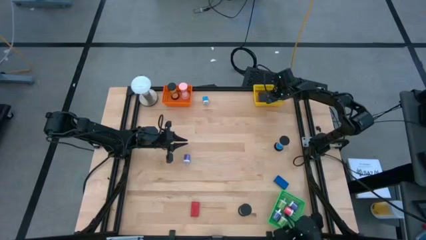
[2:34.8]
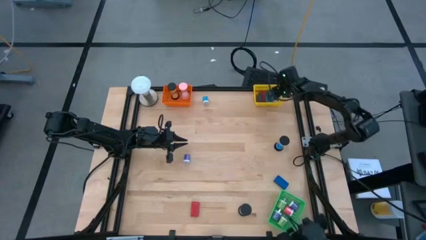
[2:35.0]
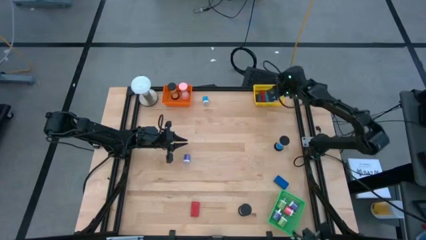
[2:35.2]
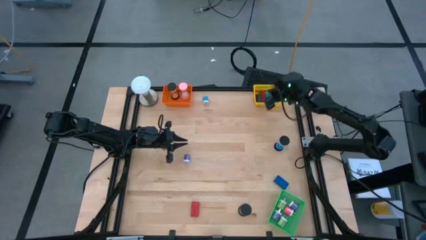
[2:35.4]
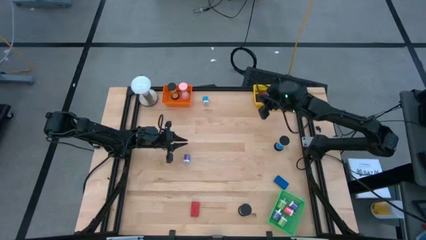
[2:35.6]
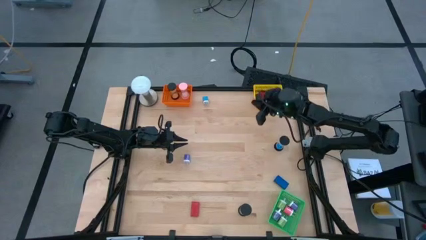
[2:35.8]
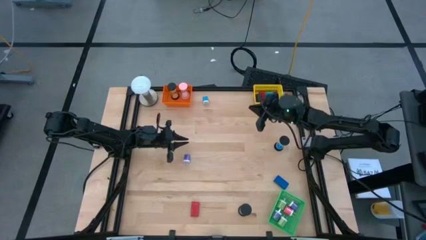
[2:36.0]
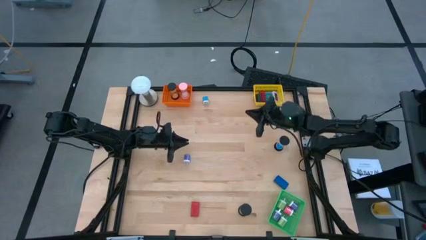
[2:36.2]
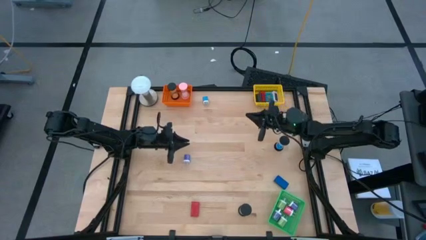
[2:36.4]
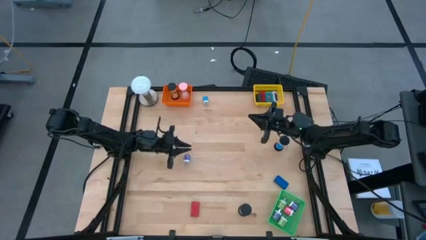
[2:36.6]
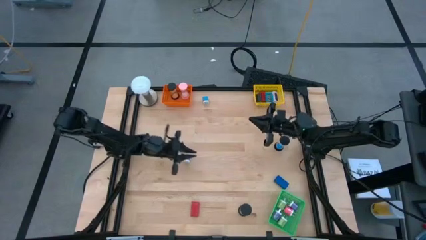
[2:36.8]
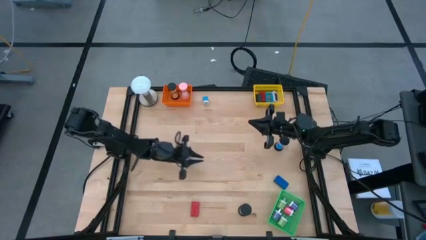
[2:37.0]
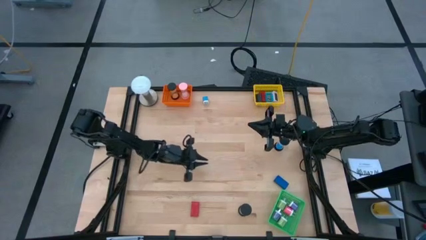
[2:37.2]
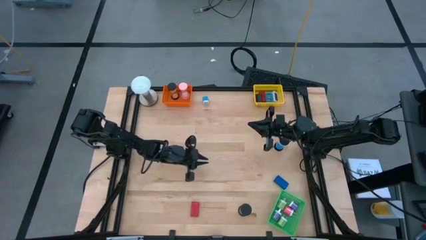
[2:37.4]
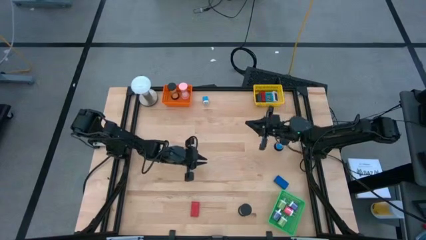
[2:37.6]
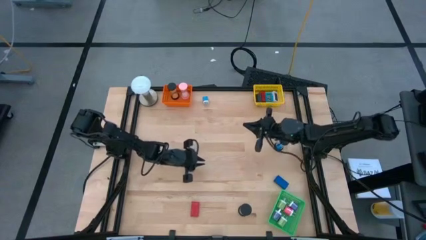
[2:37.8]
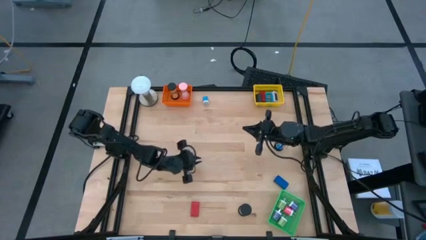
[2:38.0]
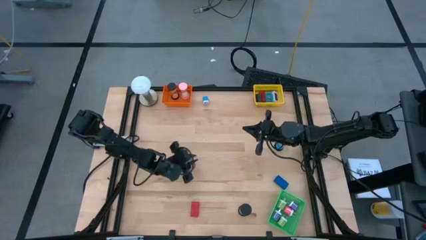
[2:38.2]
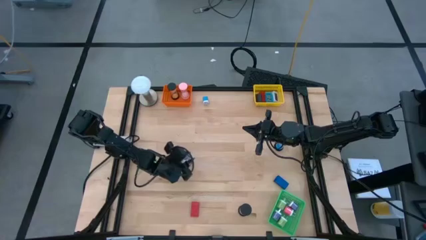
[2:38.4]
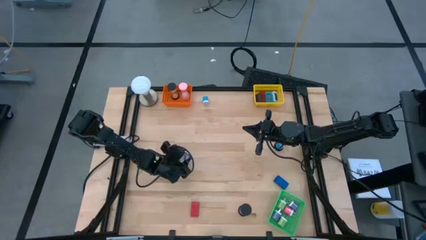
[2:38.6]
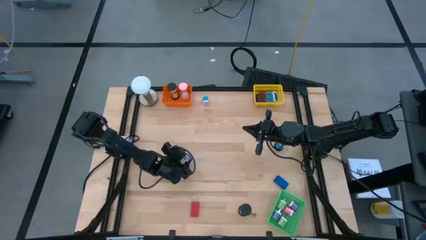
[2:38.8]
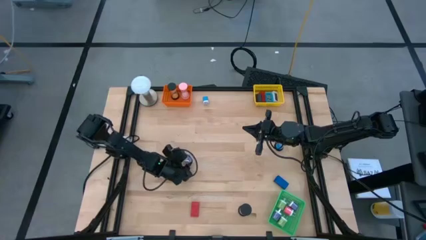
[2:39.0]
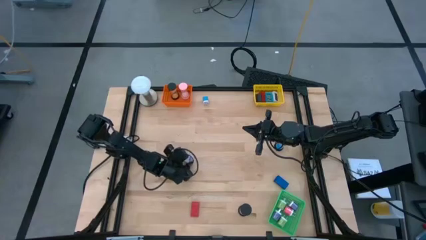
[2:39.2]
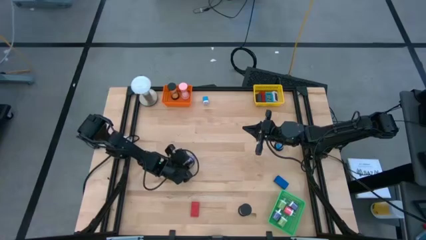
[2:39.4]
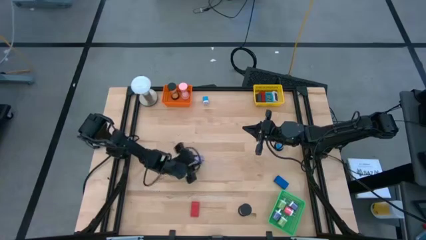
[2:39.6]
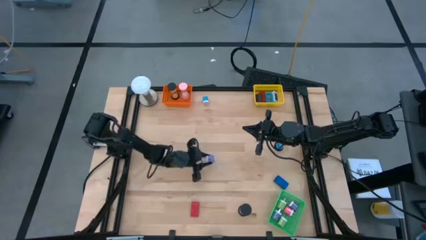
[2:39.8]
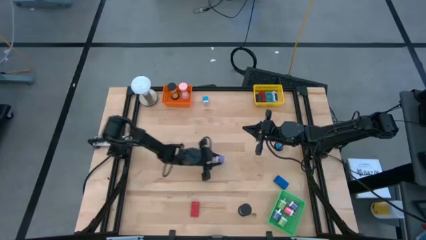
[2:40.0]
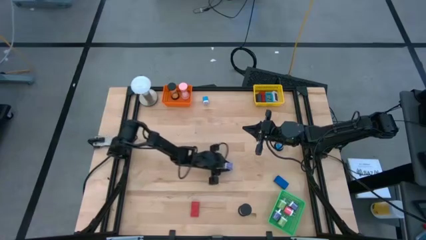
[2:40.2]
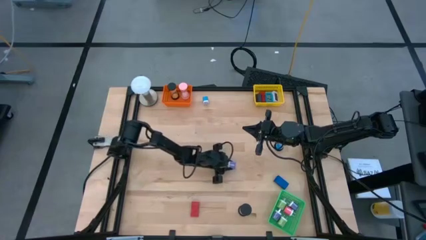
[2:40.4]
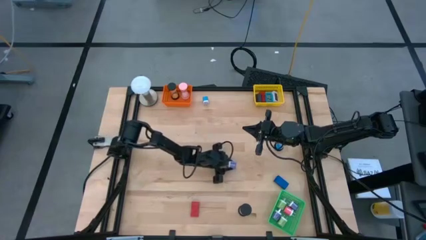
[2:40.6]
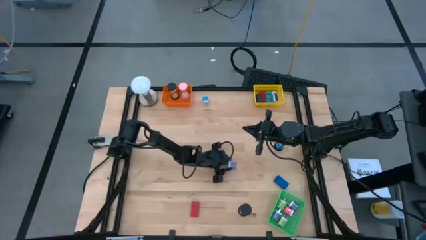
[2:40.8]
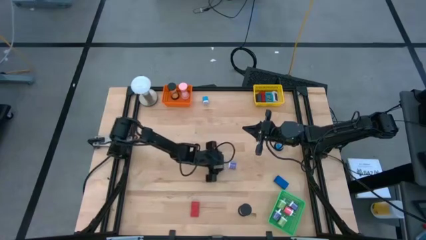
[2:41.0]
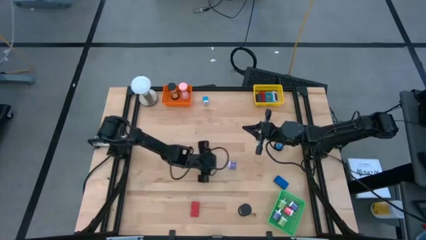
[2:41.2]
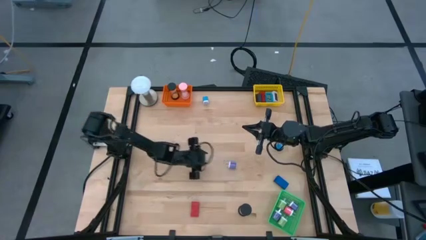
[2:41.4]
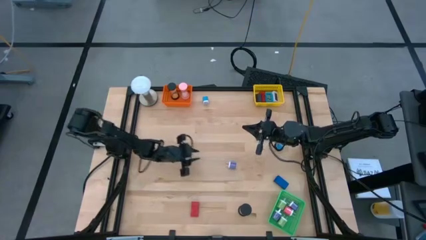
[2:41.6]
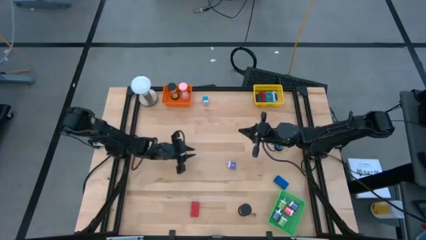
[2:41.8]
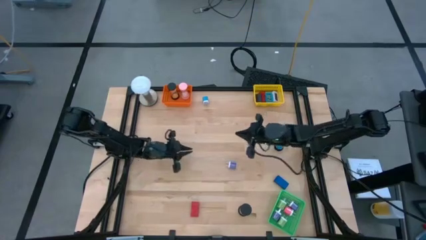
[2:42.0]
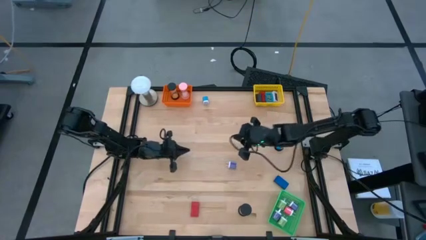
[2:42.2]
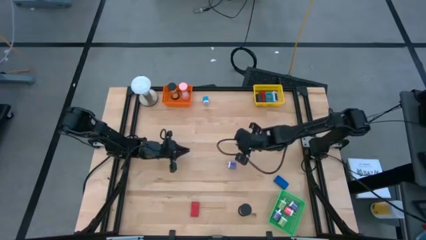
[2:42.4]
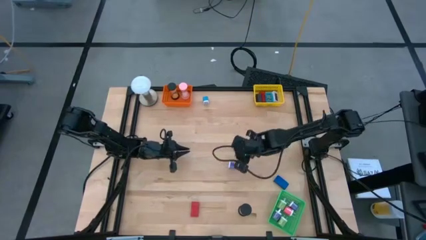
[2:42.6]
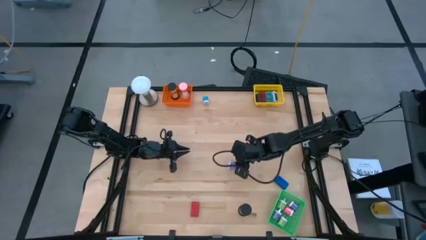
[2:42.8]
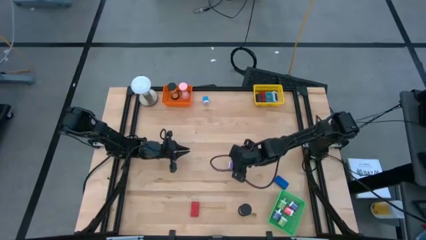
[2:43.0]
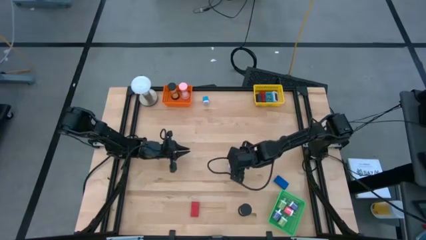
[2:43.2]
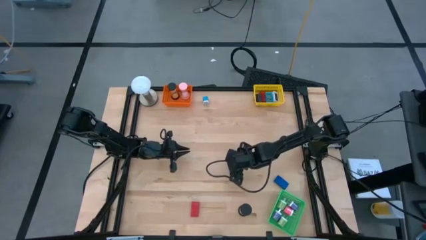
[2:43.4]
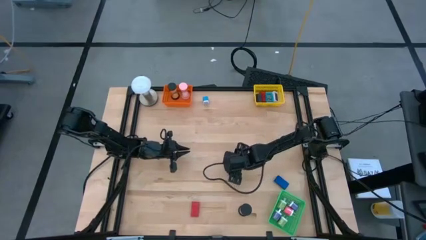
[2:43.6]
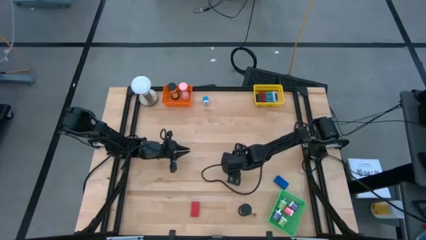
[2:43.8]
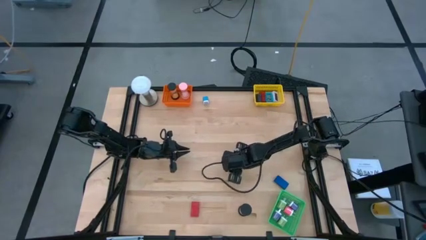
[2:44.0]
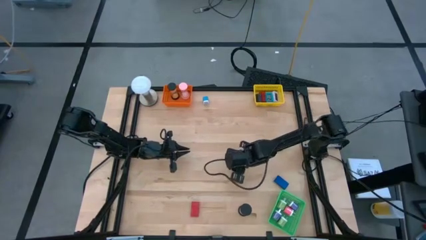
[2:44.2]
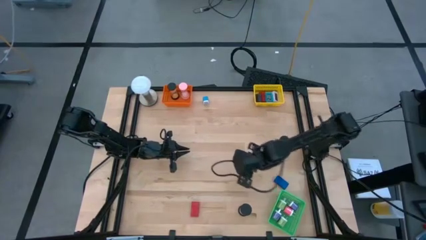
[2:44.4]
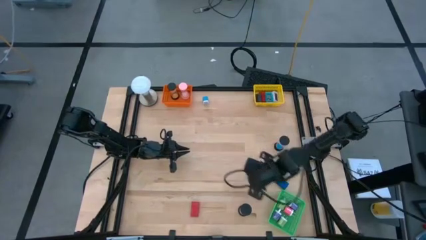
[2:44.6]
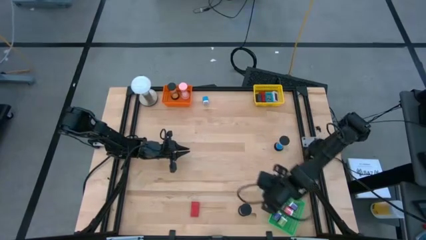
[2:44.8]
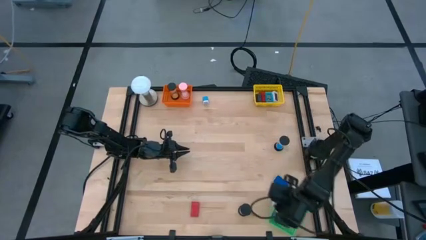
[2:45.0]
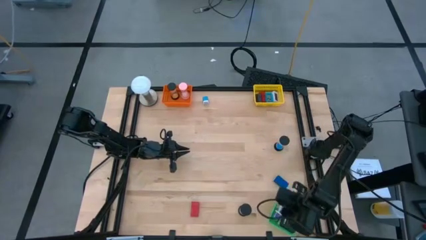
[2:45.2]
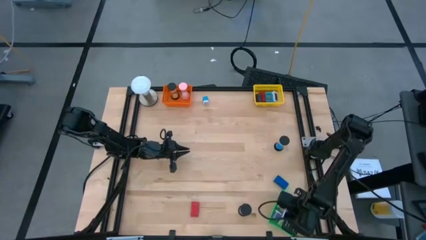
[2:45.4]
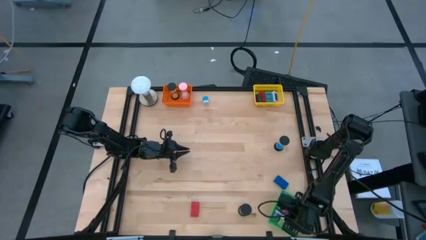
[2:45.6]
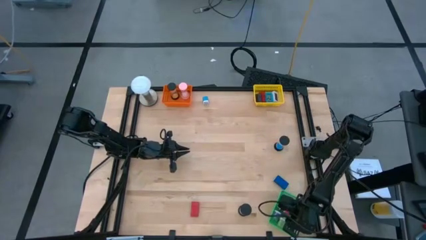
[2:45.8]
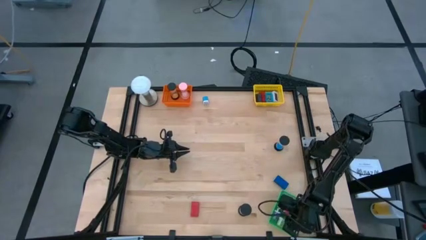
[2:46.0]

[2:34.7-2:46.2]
Task: Pick & Place Office items
Put the purple charger adapter into the green basket

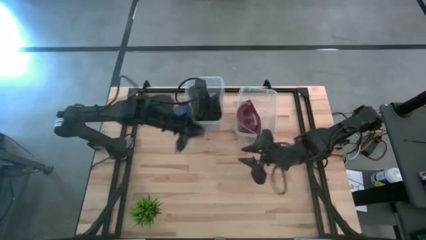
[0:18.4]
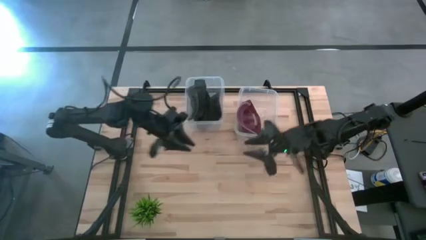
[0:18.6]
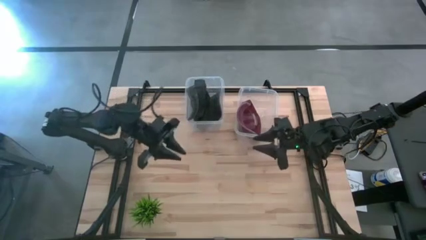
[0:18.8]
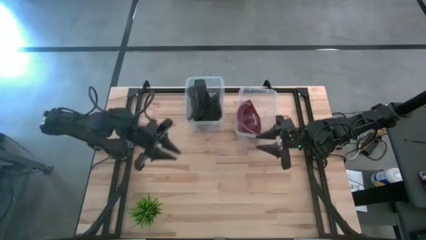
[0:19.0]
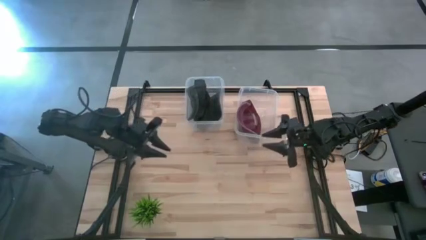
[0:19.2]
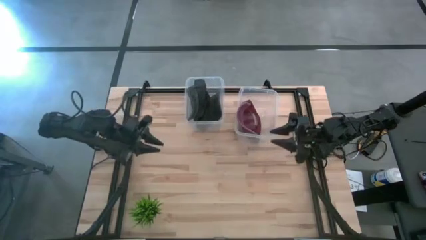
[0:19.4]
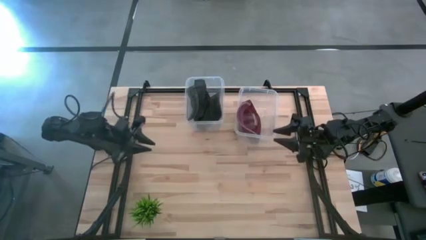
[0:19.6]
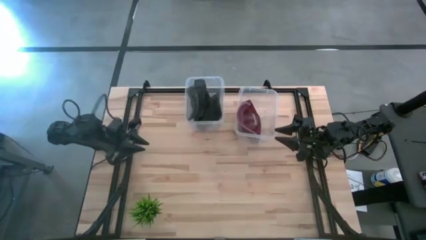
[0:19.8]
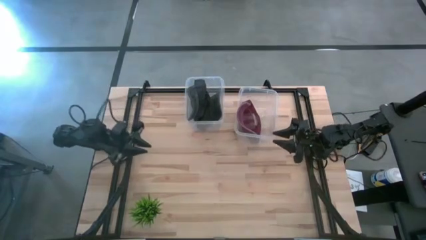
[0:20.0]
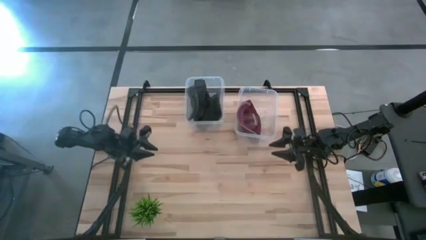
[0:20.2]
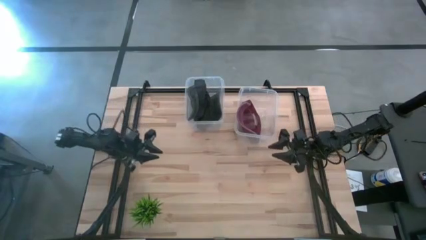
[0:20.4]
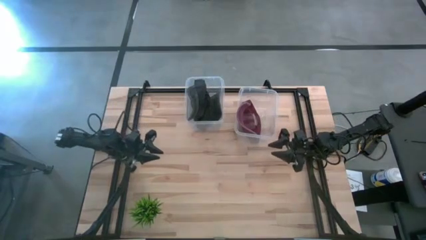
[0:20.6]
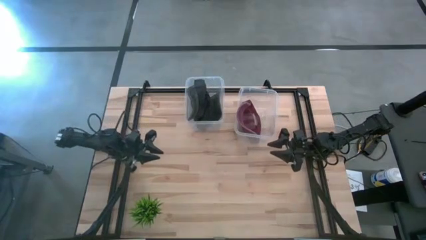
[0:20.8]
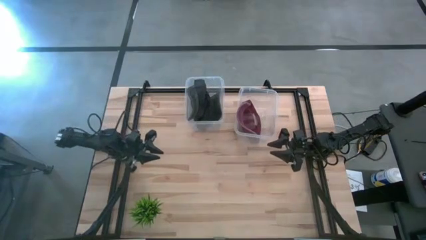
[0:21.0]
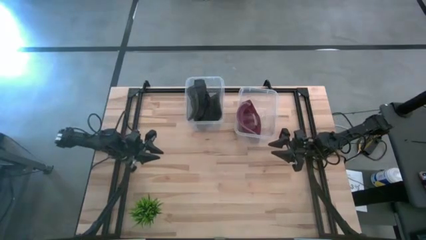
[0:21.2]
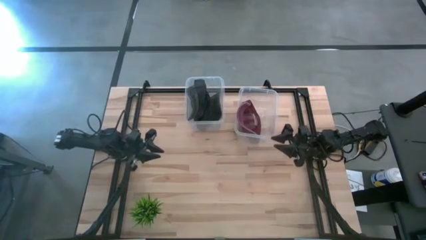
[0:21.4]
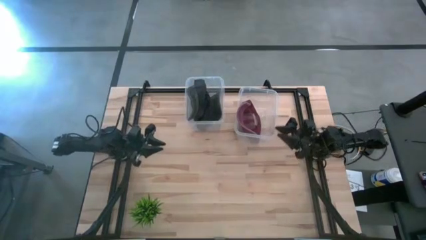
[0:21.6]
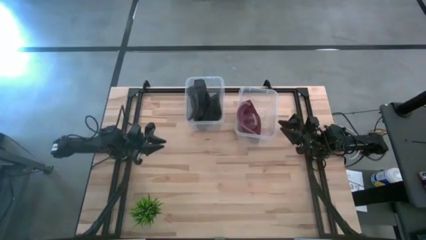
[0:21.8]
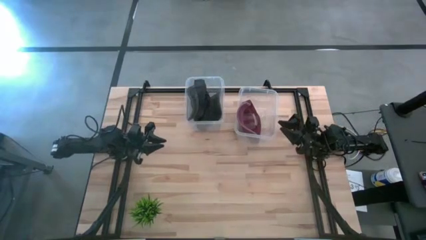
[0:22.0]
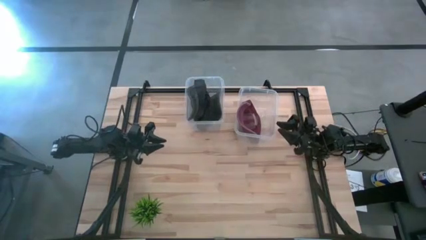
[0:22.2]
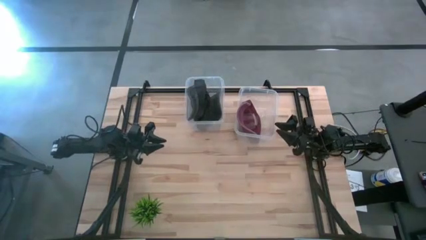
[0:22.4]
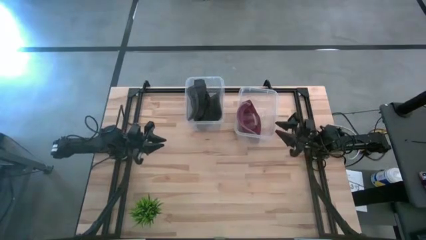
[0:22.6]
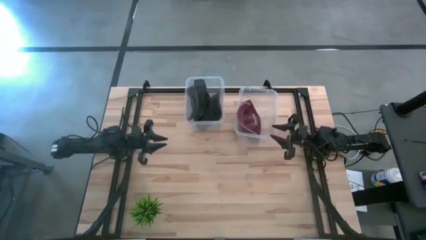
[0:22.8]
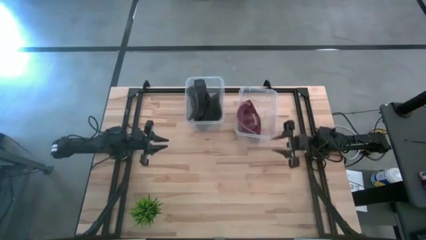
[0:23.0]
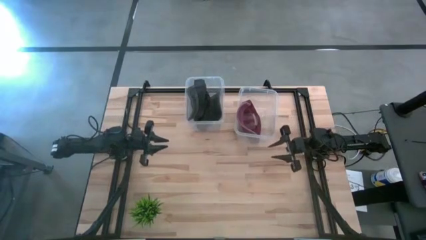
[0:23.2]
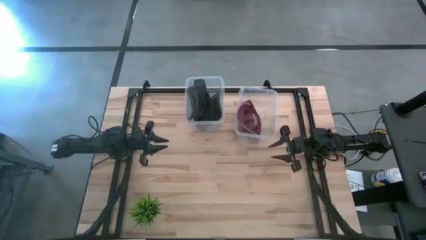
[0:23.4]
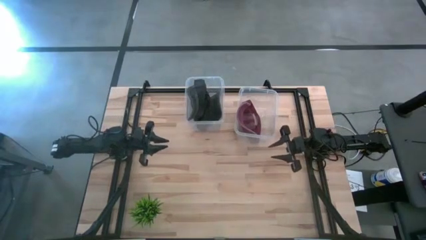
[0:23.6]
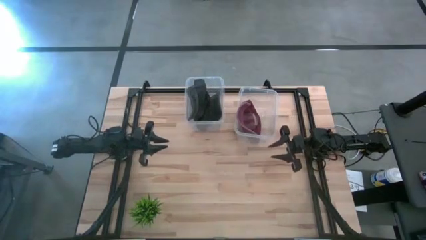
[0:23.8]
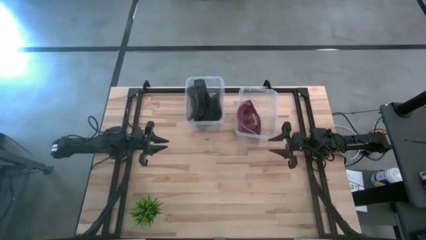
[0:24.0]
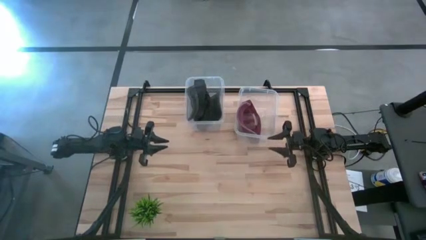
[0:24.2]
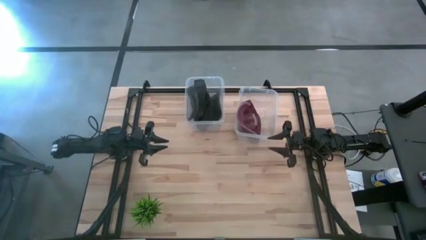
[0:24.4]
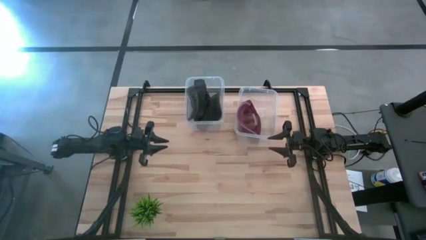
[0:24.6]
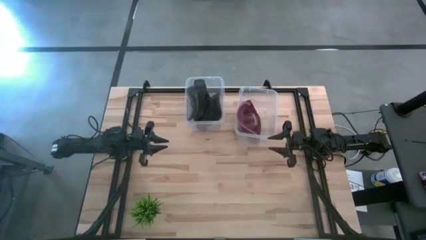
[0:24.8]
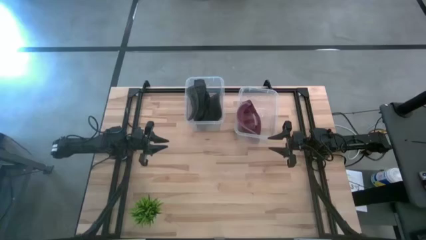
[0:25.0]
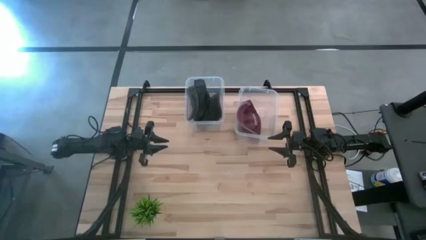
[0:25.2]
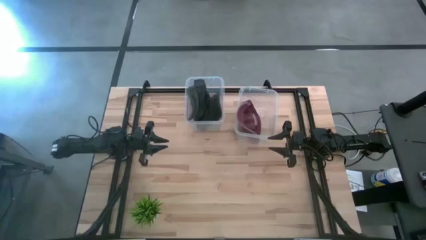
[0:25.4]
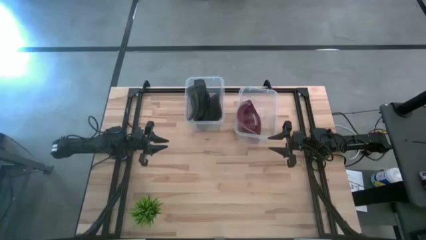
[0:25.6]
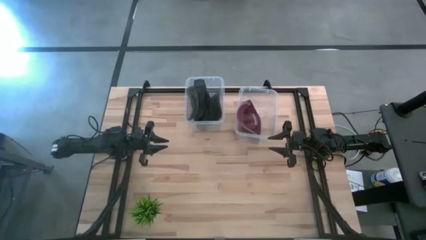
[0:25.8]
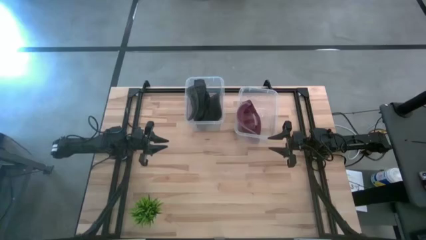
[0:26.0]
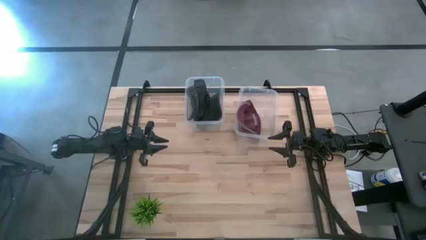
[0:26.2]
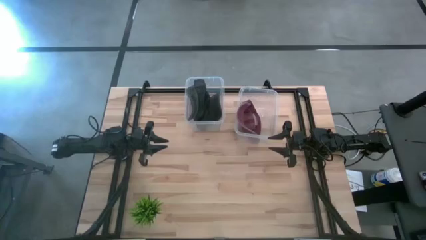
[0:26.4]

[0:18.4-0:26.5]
Task: Pick & Place hat
Return to Home Position
